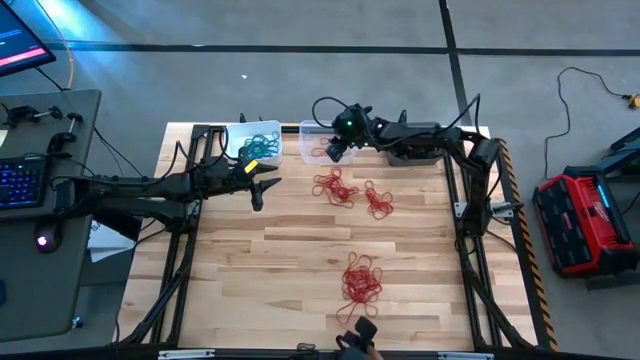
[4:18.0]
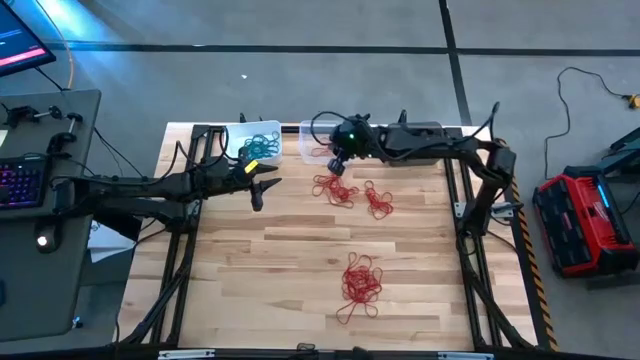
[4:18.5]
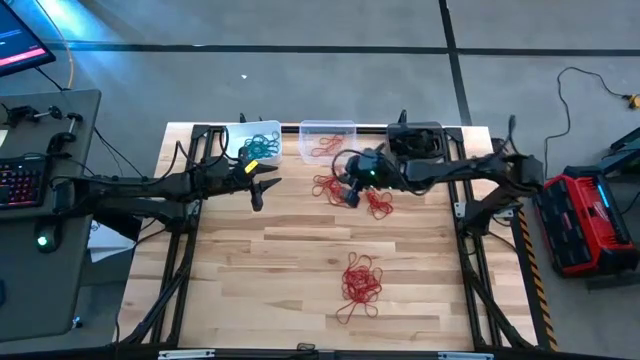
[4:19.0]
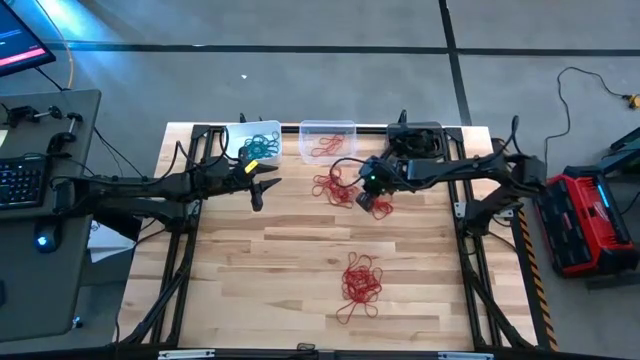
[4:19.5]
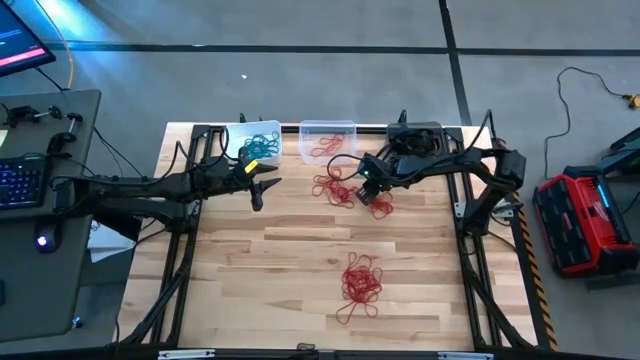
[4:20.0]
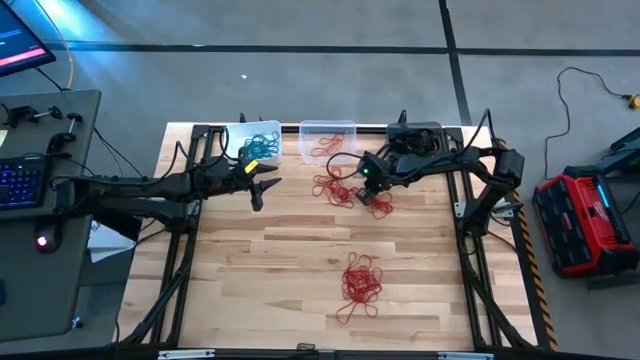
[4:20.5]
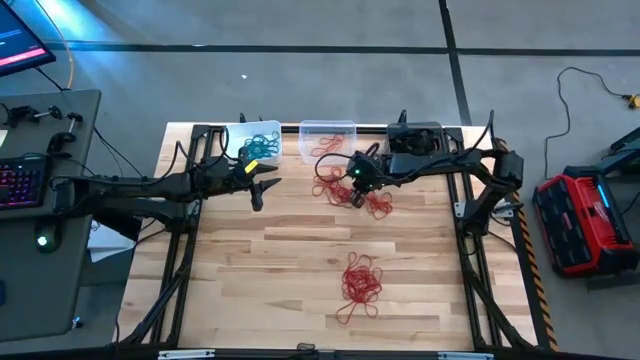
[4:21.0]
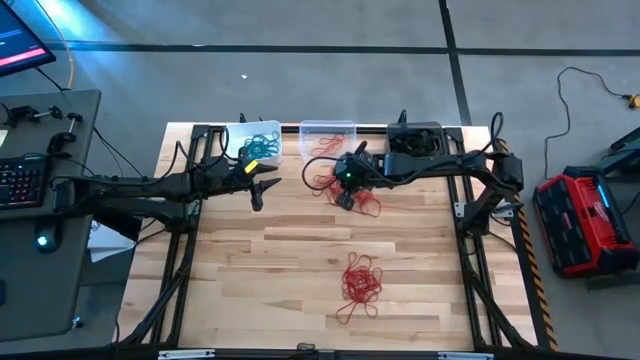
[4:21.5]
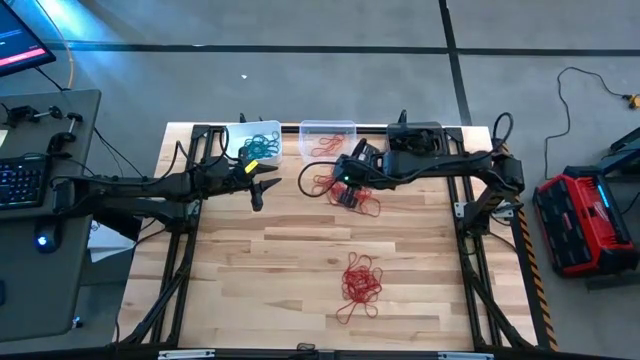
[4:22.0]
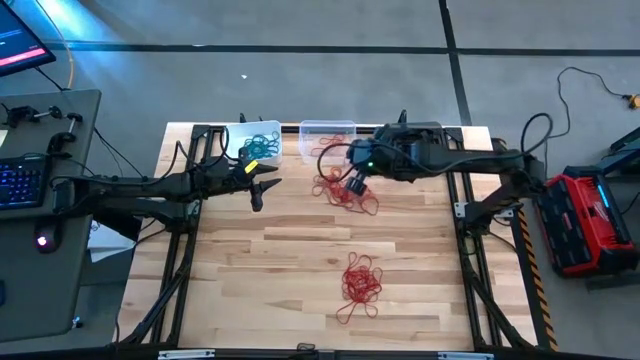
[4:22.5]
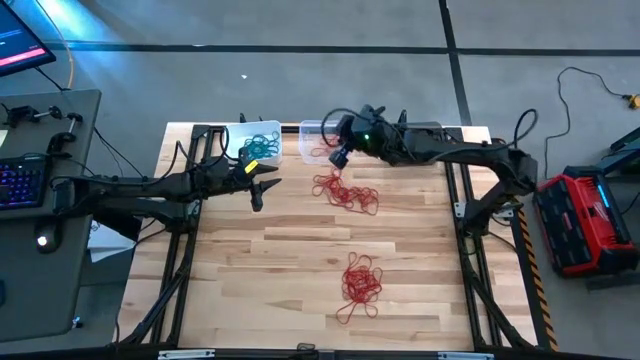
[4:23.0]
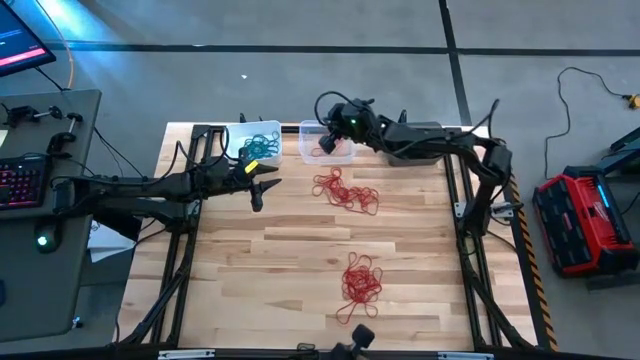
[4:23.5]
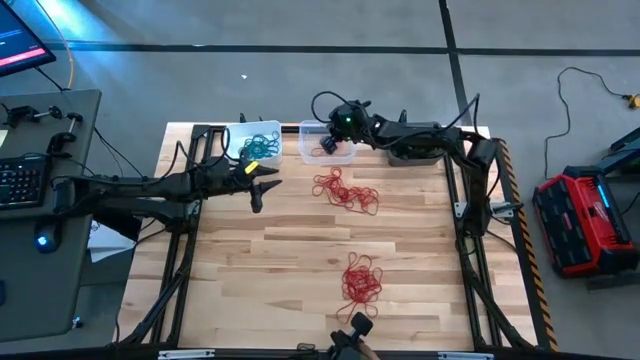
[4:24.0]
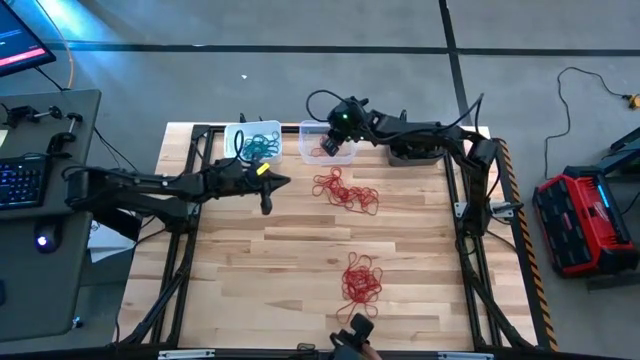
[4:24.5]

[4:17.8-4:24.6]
Task: Sort rubber bands into baskets
Put the red rubber band into the transparent bin

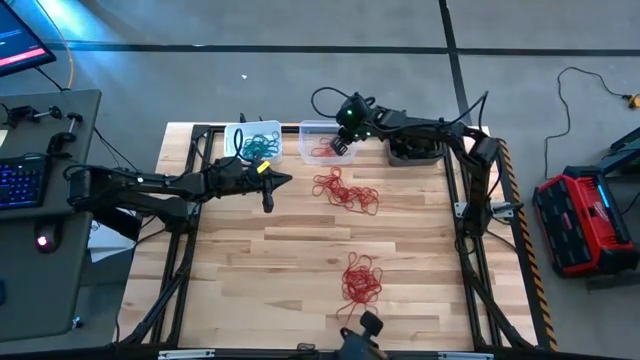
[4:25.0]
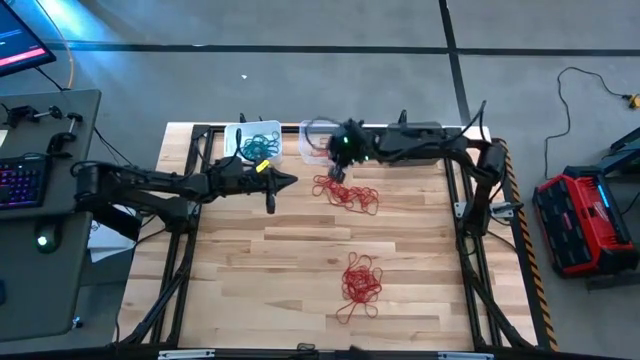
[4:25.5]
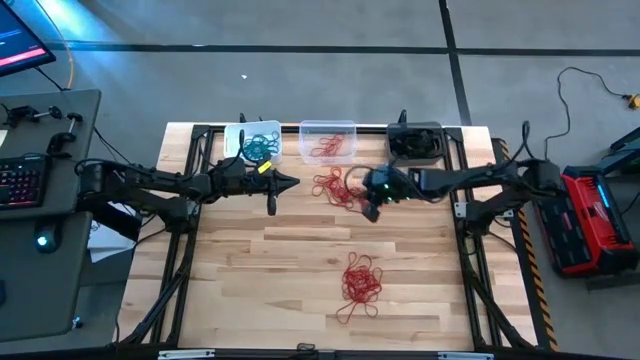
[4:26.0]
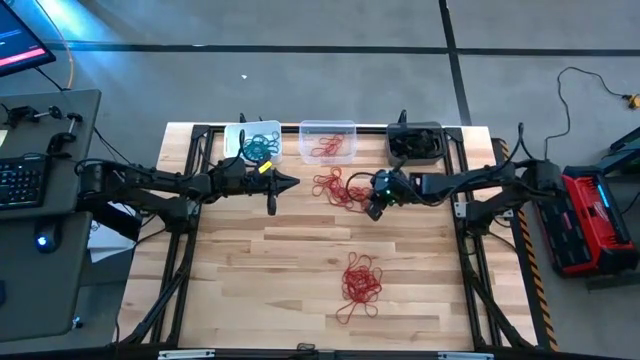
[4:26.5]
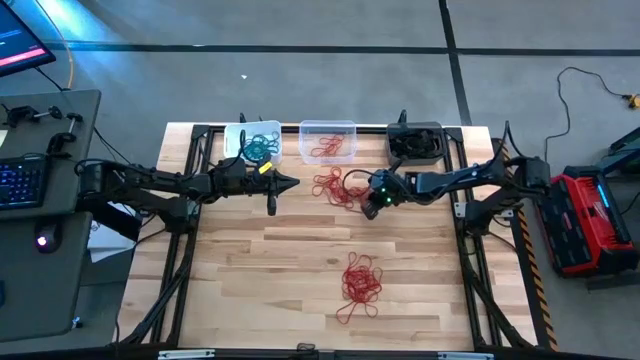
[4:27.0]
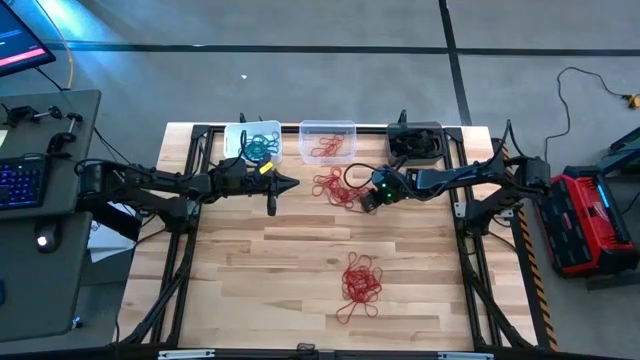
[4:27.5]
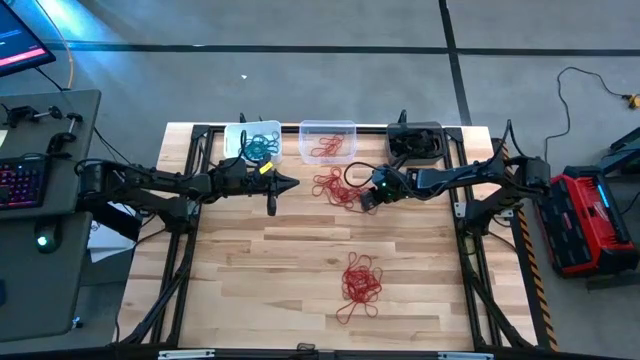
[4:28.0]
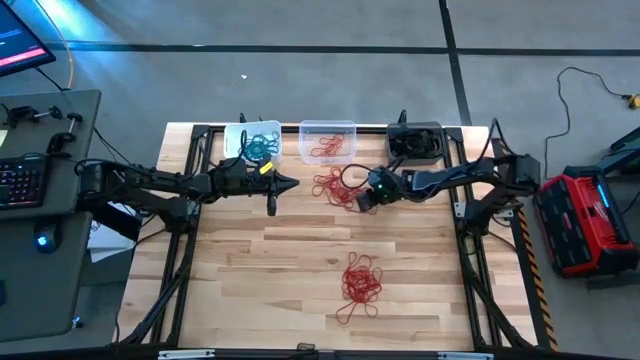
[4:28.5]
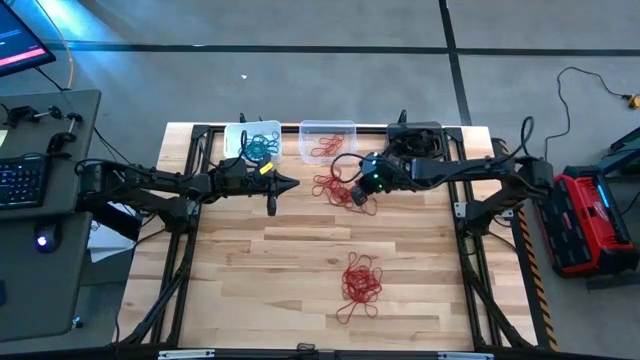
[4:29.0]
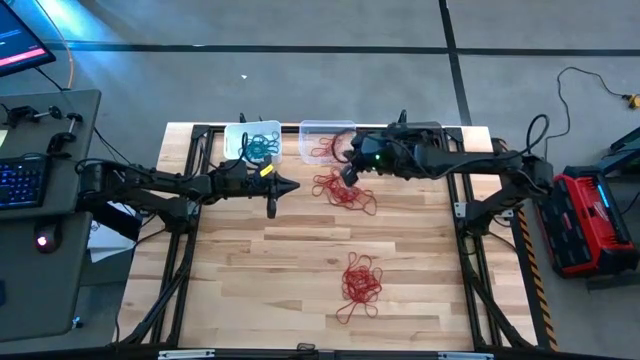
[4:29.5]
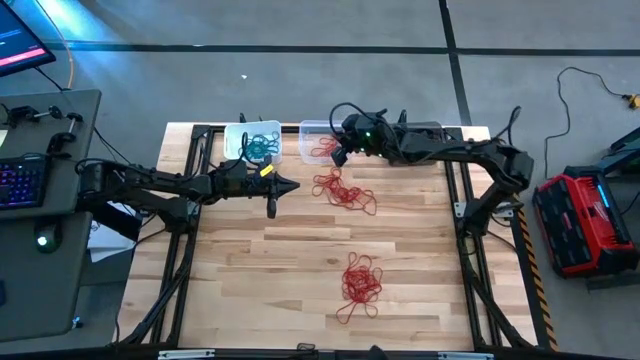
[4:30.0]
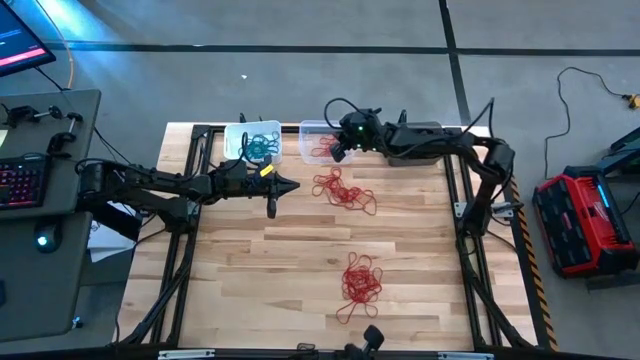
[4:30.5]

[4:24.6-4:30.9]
Put the red rubber band into the transparent bin

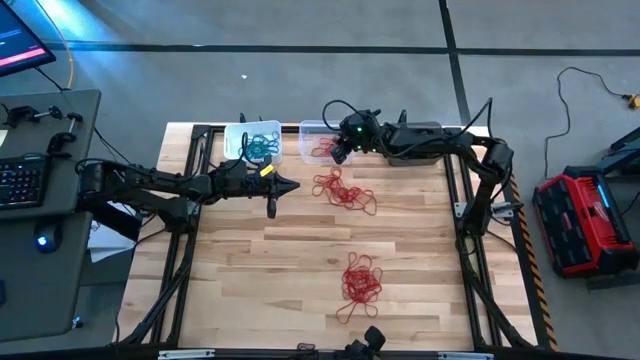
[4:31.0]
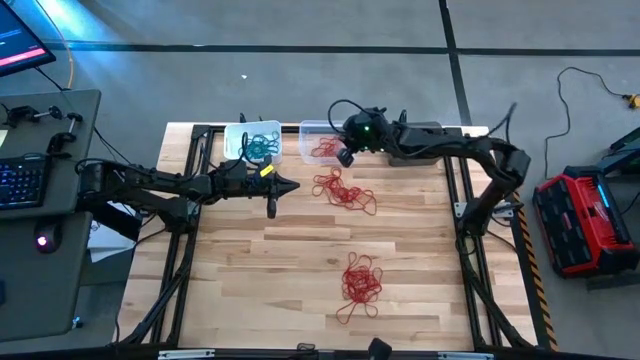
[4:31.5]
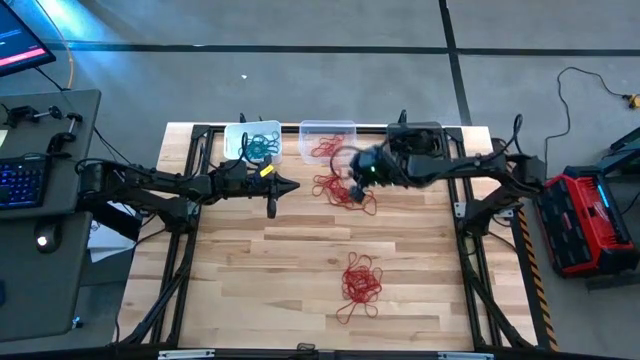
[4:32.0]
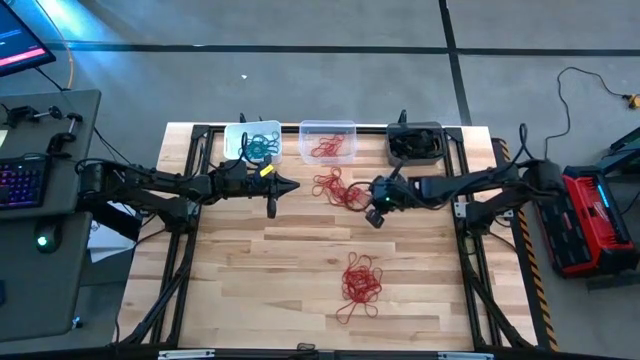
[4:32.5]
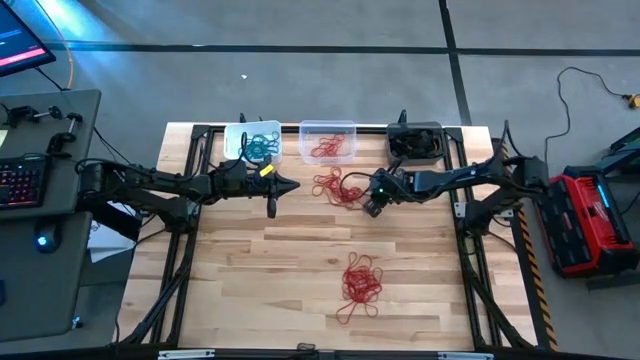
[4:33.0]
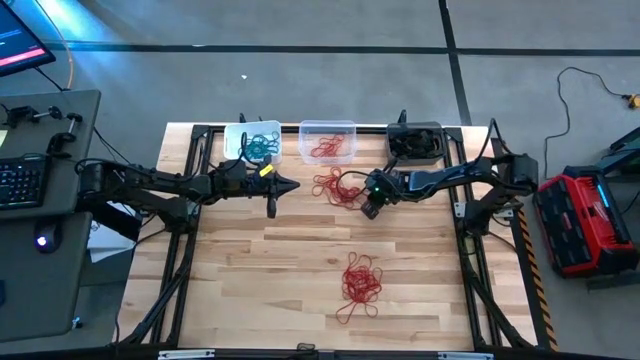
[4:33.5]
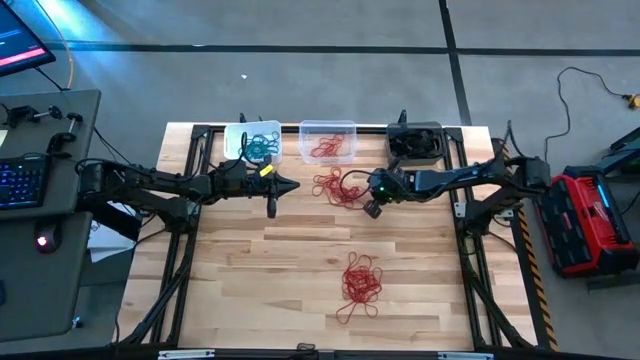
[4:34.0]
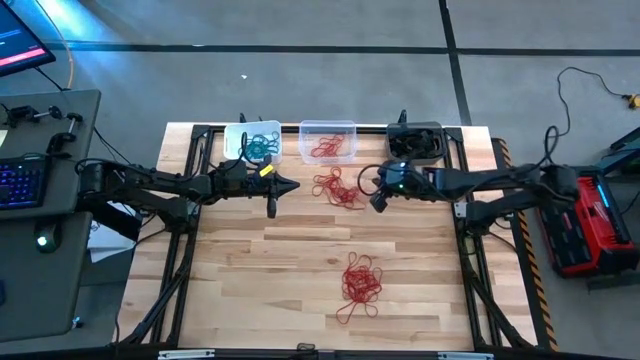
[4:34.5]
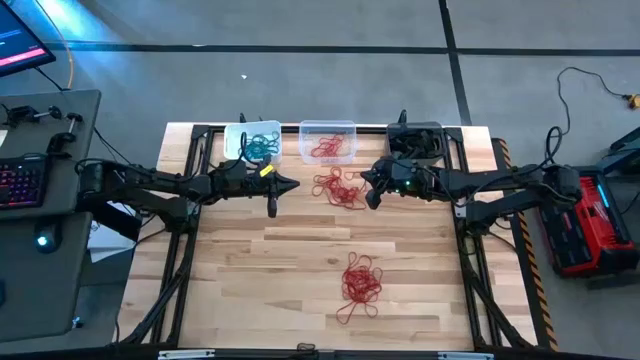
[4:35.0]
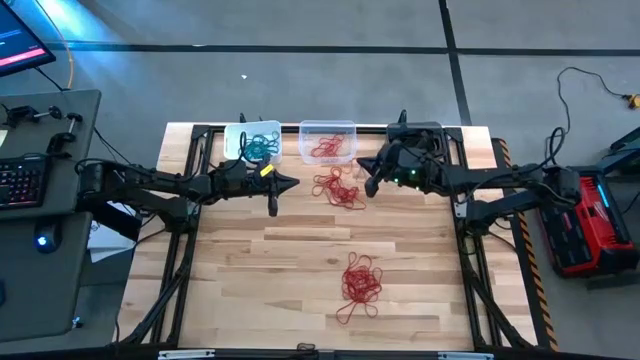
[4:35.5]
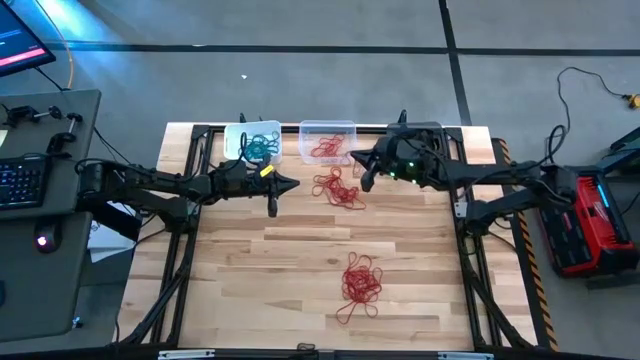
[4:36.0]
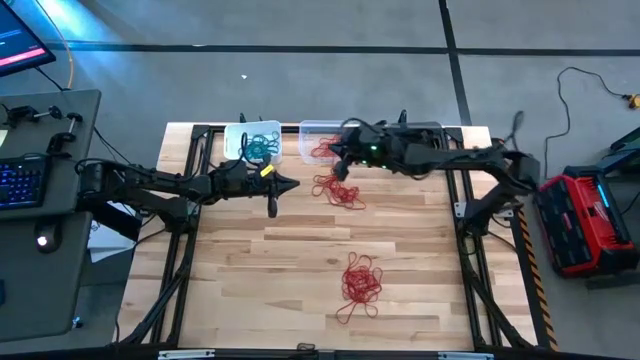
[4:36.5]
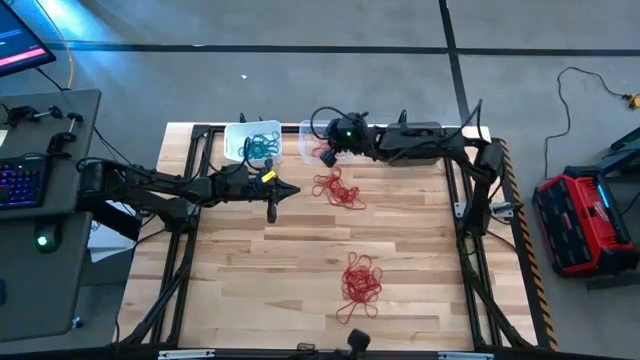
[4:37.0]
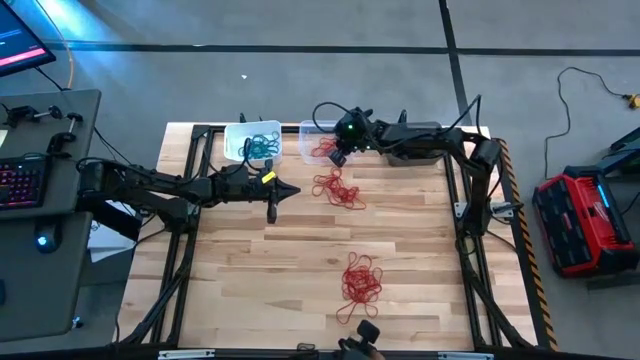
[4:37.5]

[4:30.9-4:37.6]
Put the red rubber band into the transparent bin

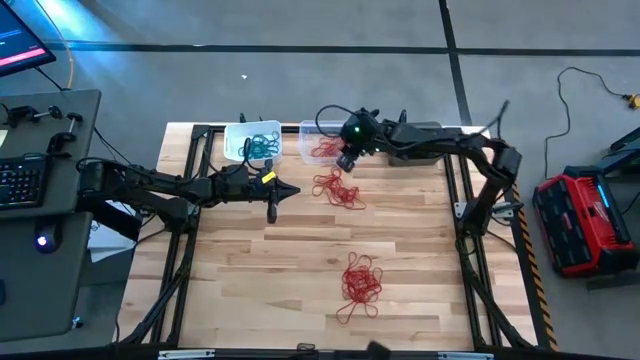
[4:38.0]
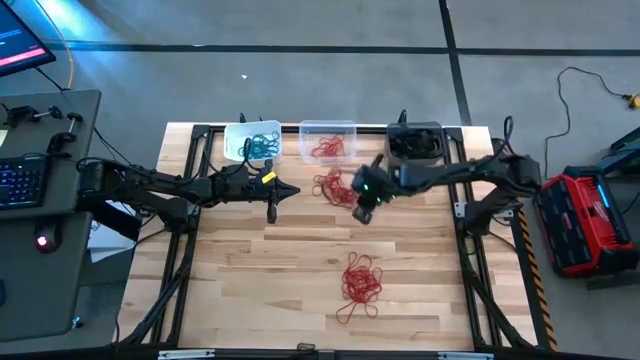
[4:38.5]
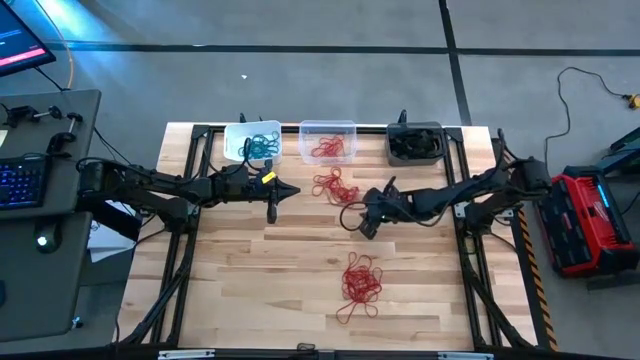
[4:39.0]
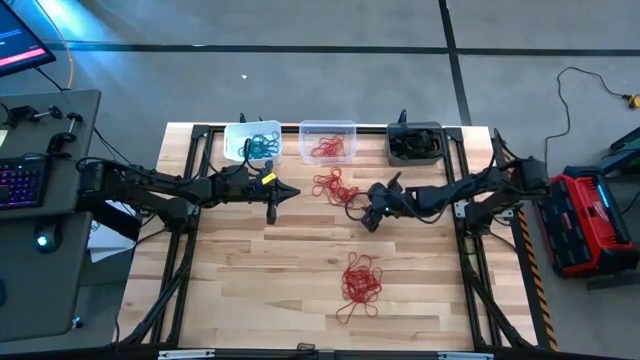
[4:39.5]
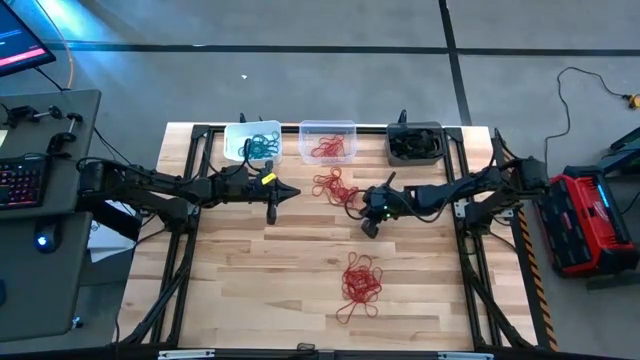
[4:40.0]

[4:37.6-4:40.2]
Put the red rubber band into the transparent bin
